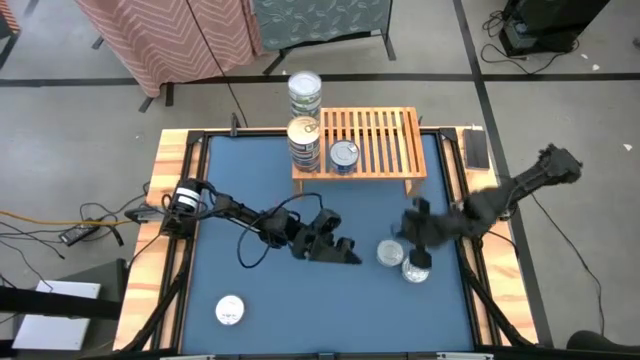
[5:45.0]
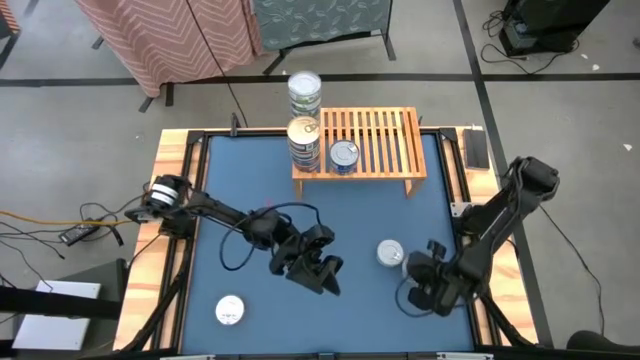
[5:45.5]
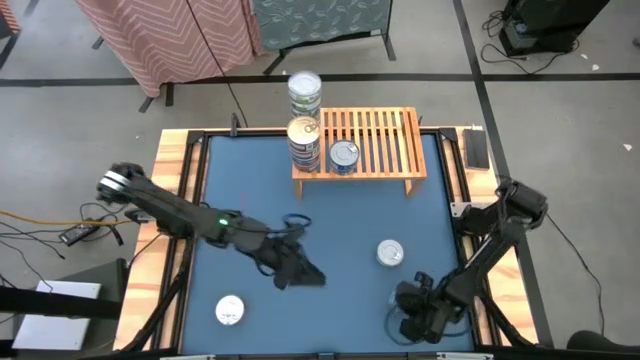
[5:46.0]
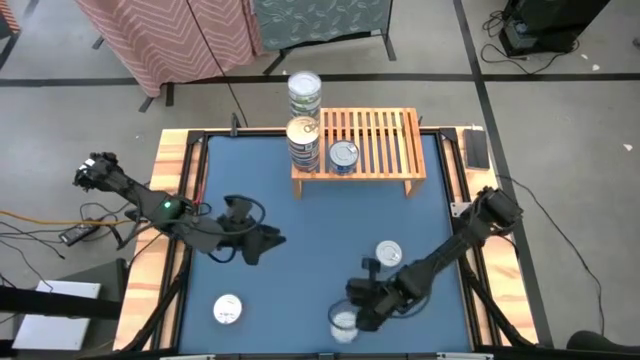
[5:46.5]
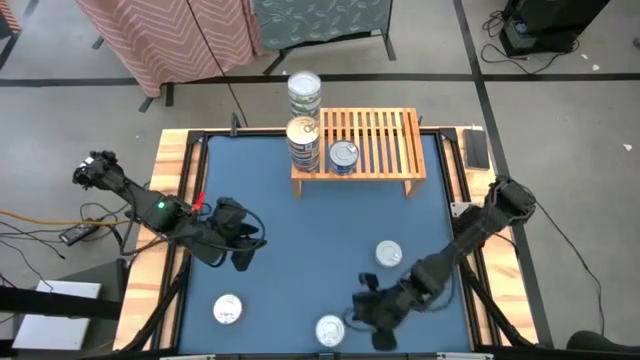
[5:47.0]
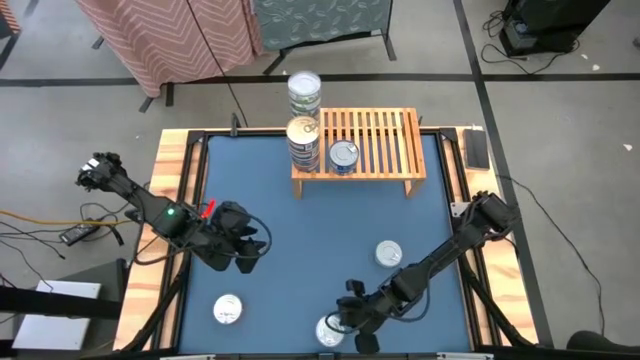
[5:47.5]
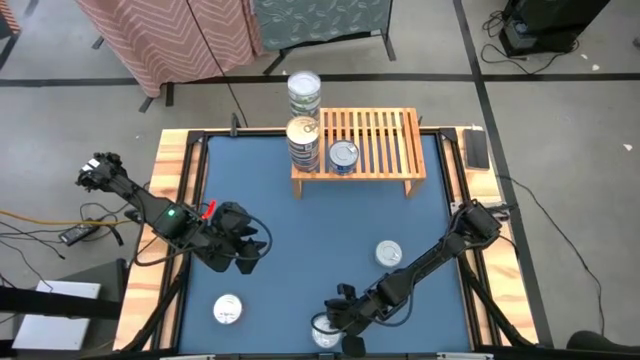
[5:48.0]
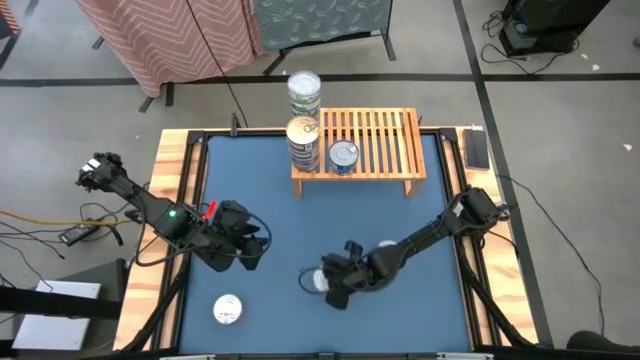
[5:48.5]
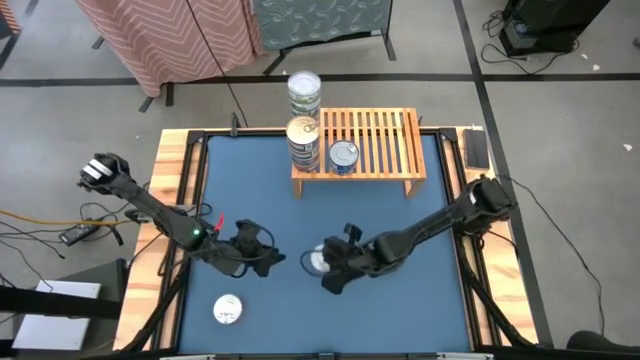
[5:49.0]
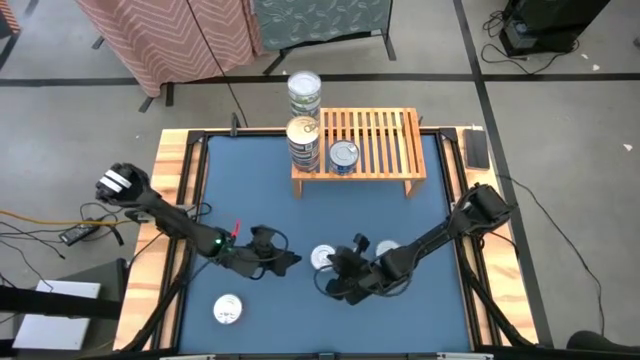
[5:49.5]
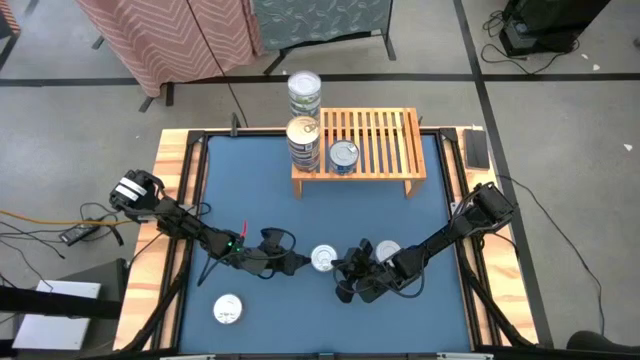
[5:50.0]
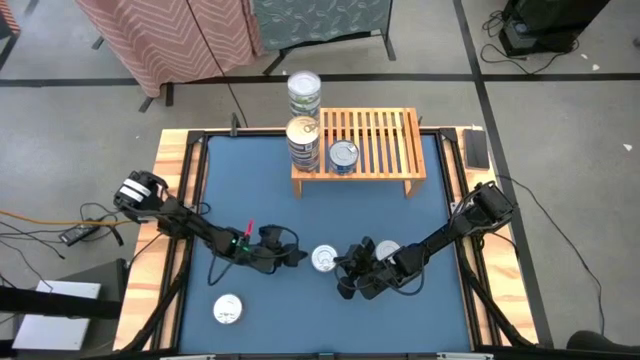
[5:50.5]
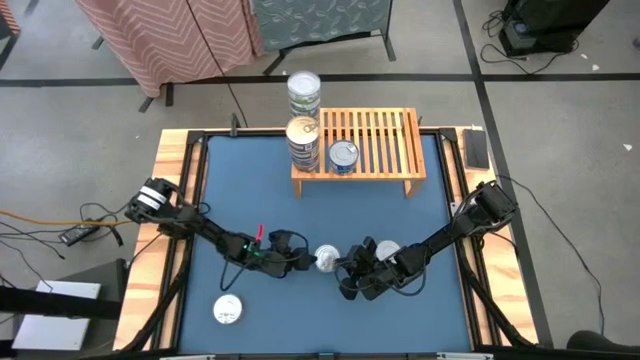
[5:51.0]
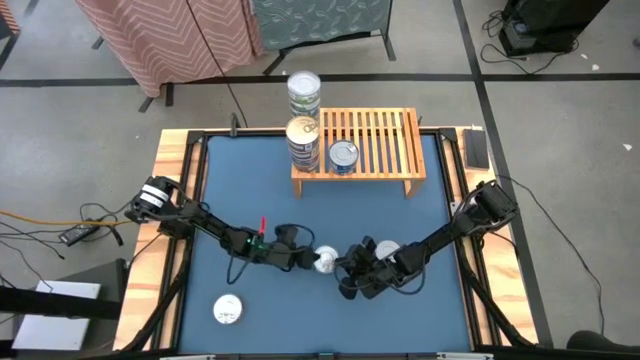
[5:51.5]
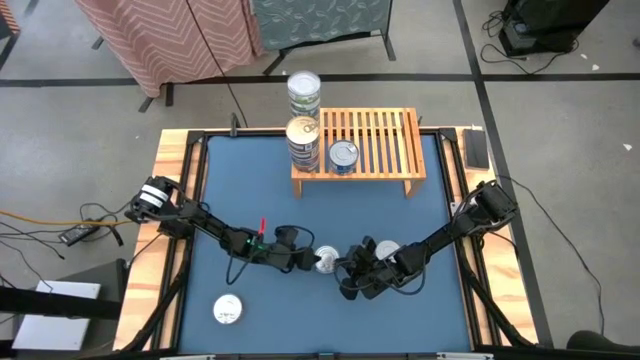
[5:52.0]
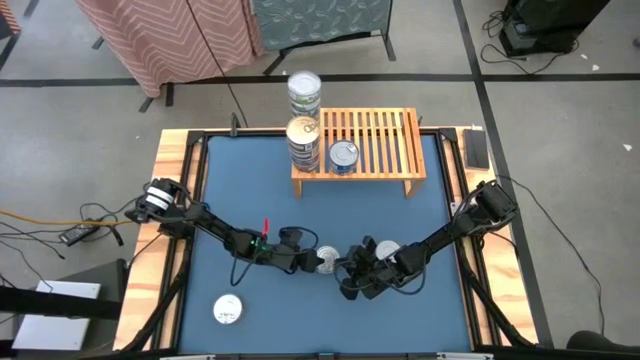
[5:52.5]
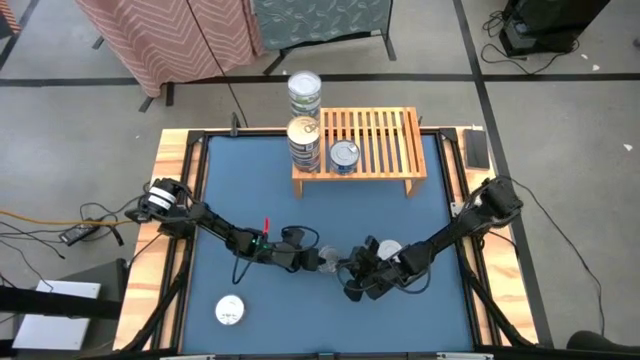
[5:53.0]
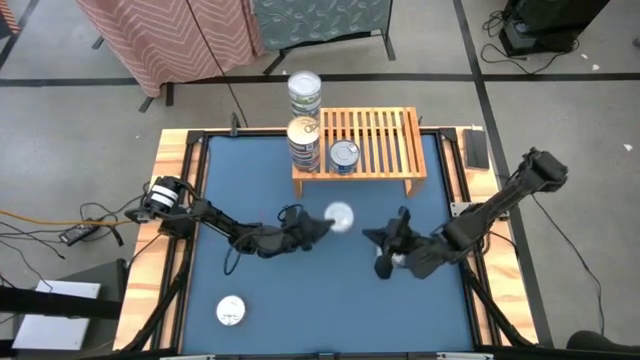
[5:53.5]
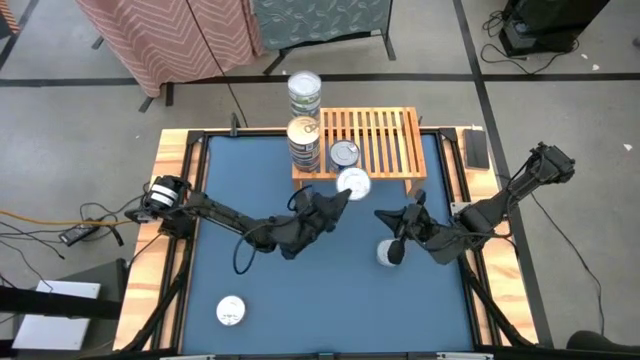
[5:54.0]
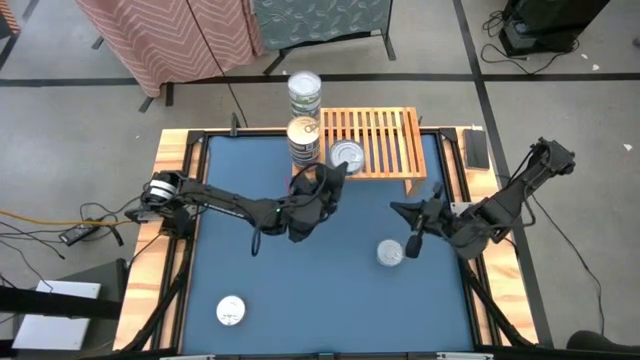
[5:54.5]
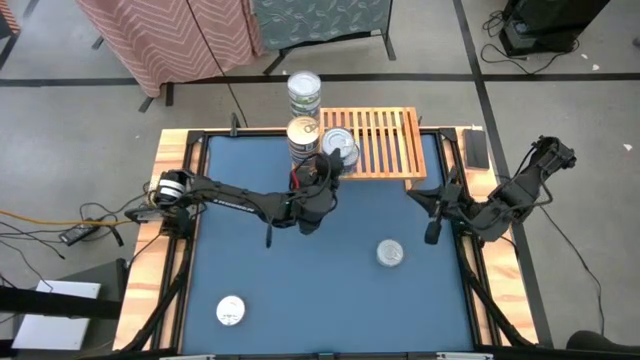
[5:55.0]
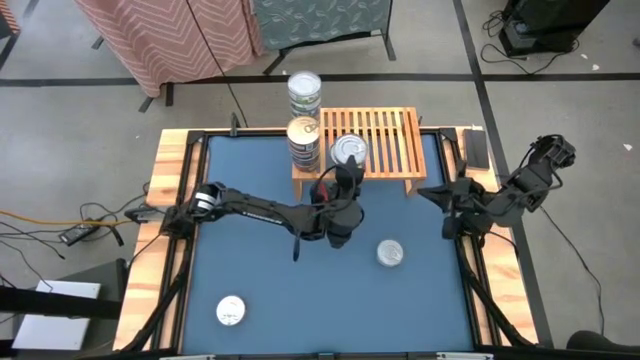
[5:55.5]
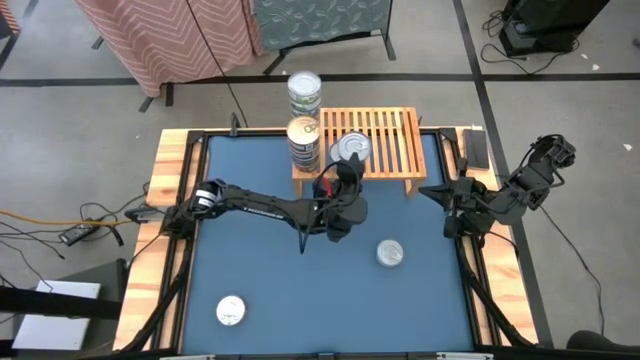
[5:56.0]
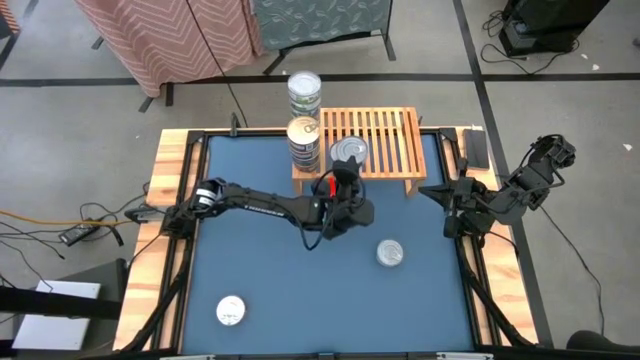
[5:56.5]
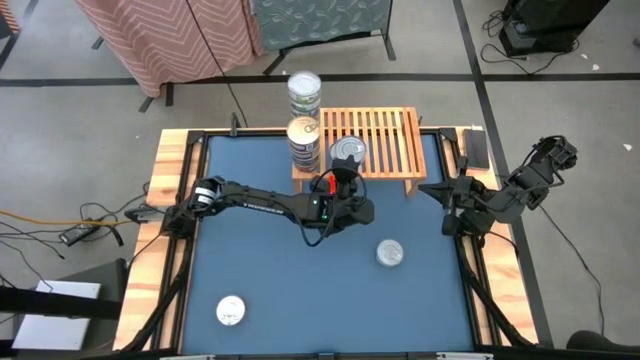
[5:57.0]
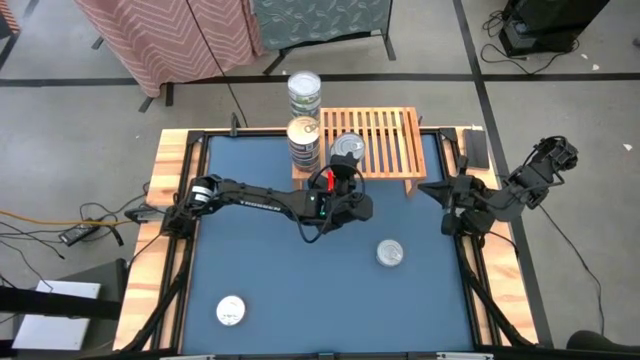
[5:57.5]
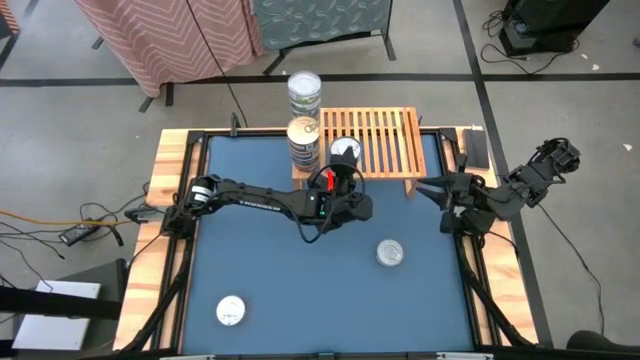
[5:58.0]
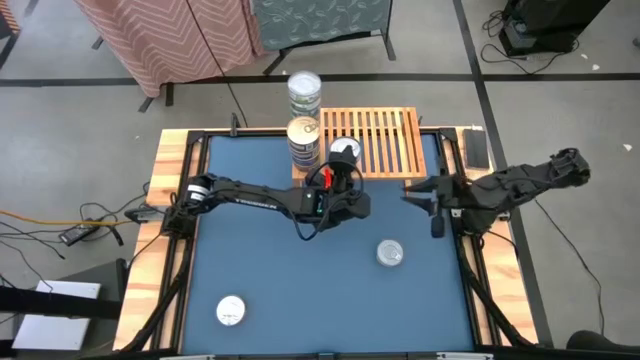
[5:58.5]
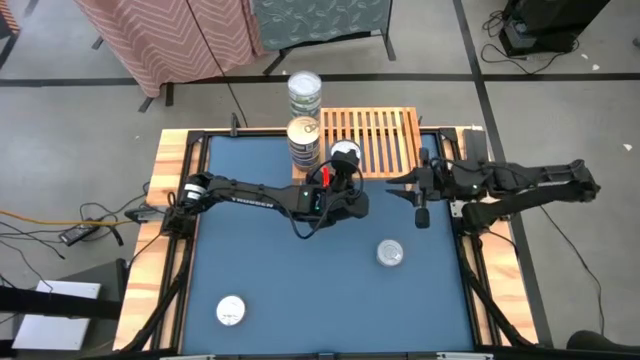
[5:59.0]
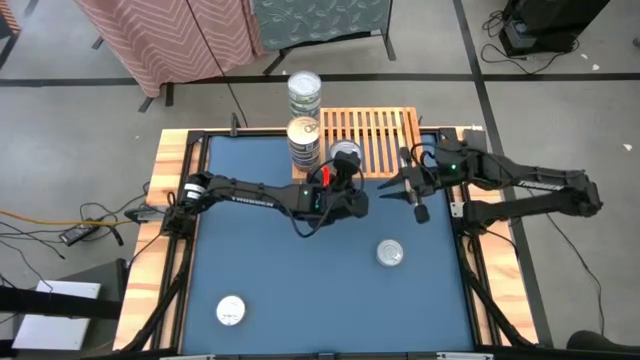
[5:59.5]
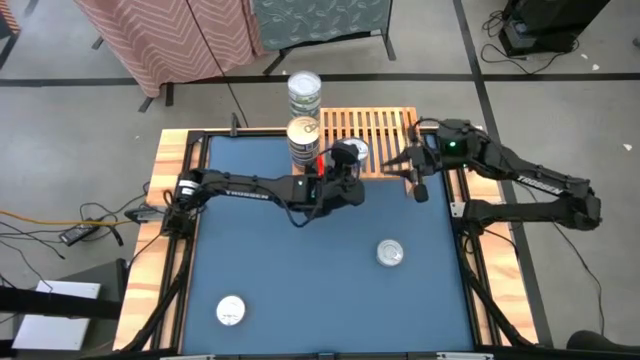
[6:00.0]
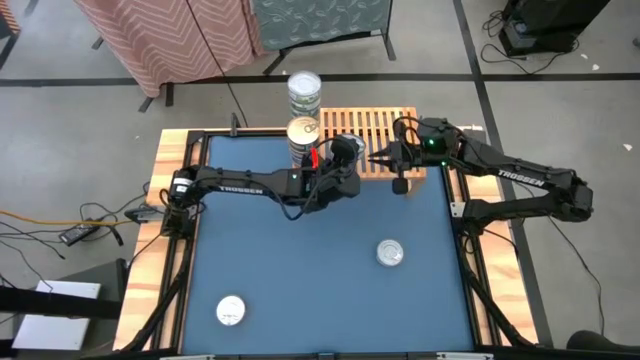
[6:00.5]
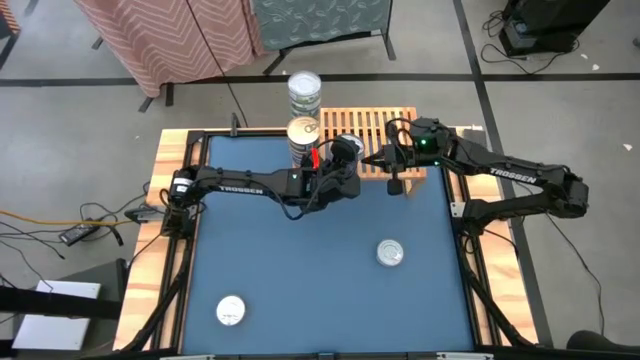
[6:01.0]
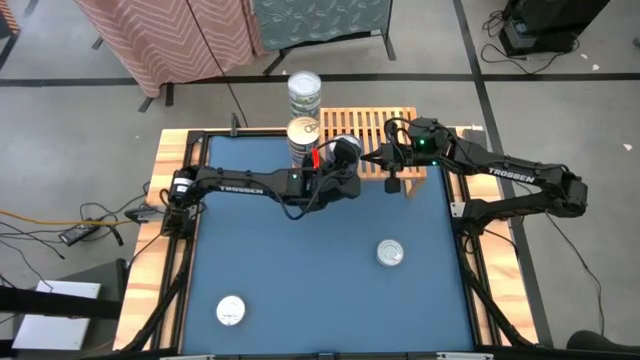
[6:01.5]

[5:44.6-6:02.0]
Task: Stack canned seafood by type on shelf
Stack the dark blue tuna can on top of the dark blue tuna can on the shelf

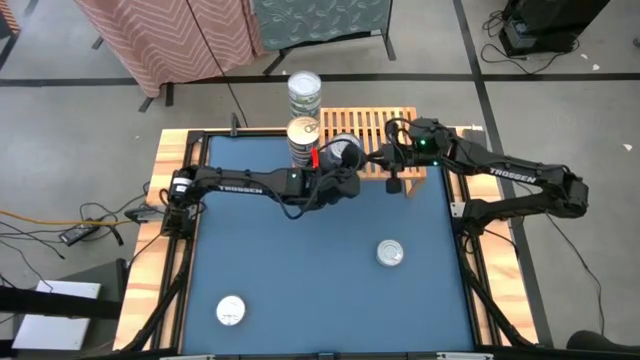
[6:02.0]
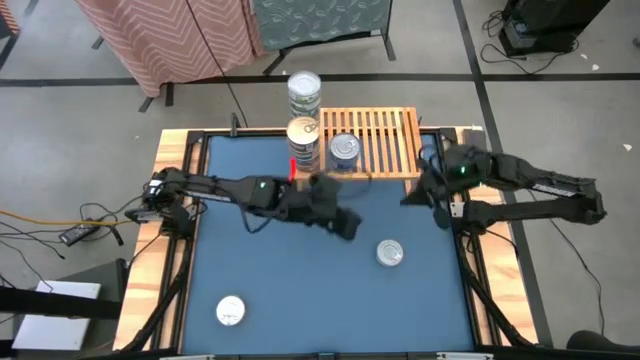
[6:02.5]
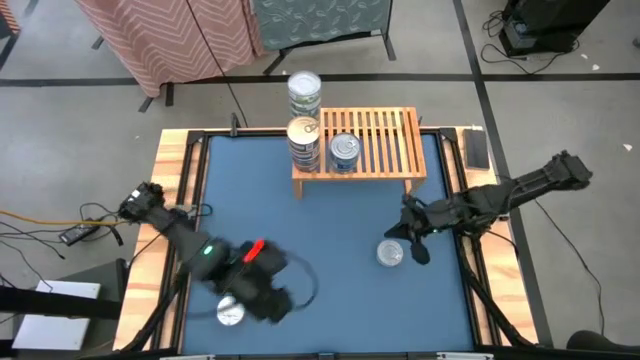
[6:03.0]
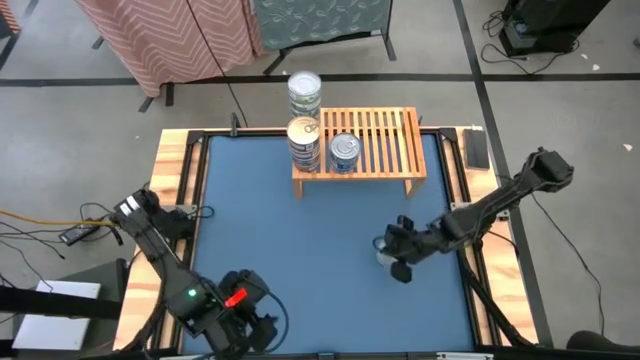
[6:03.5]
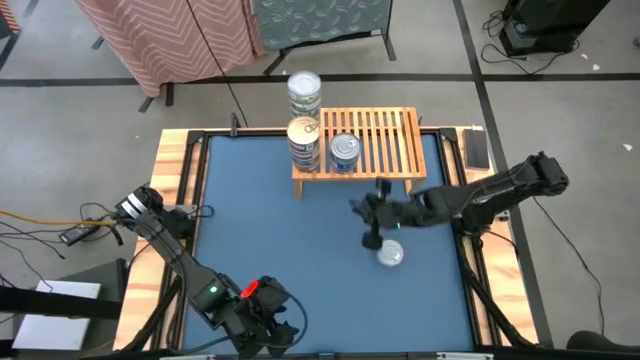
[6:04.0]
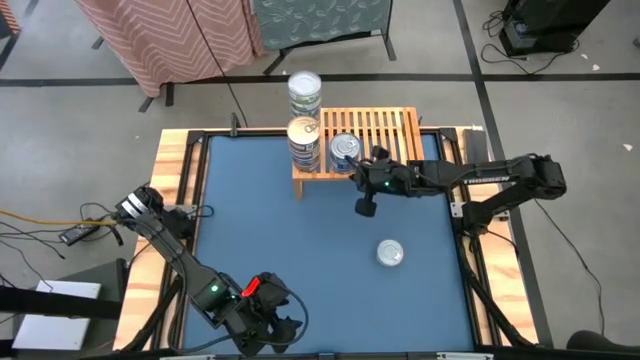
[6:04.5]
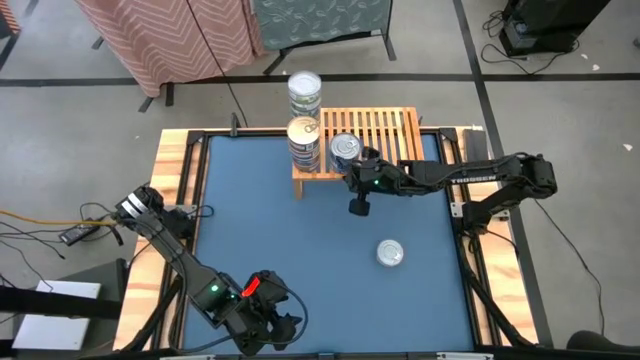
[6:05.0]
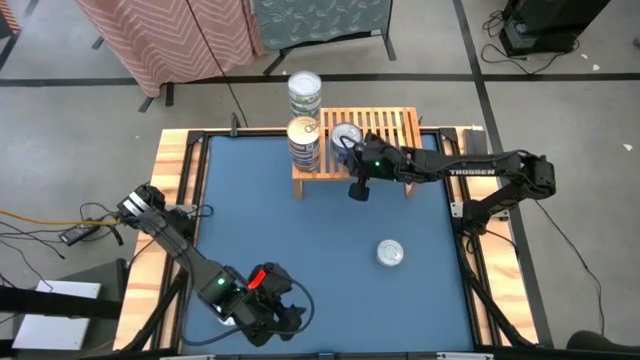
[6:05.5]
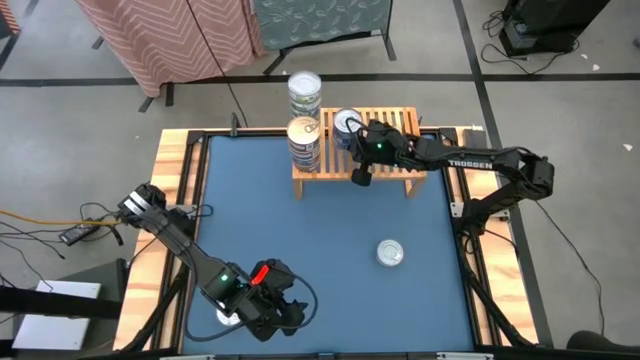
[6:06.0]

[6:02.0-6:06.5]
Adjust the stacked dark blue tuna cans on the shelf

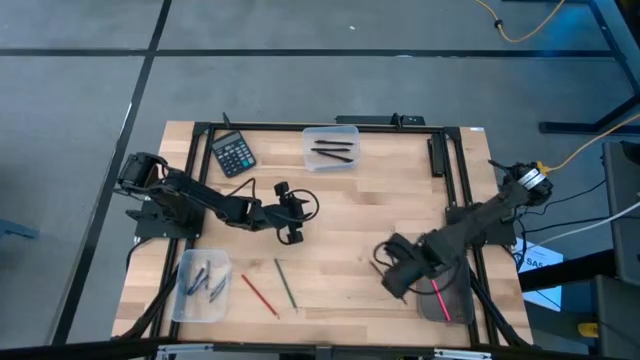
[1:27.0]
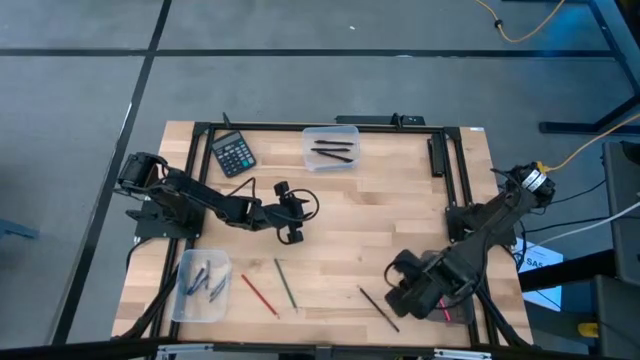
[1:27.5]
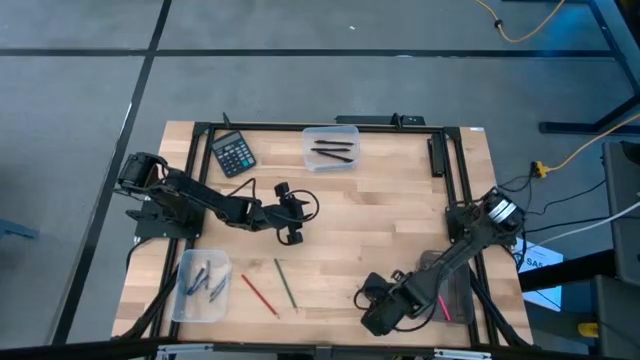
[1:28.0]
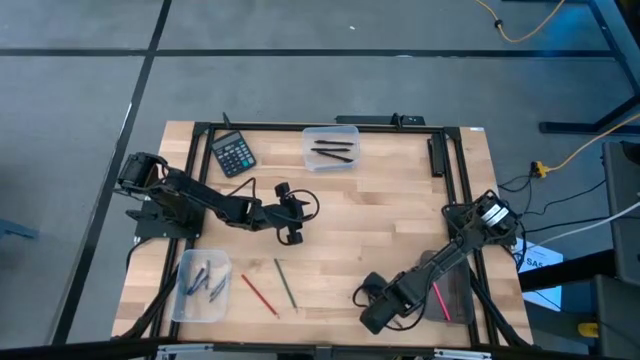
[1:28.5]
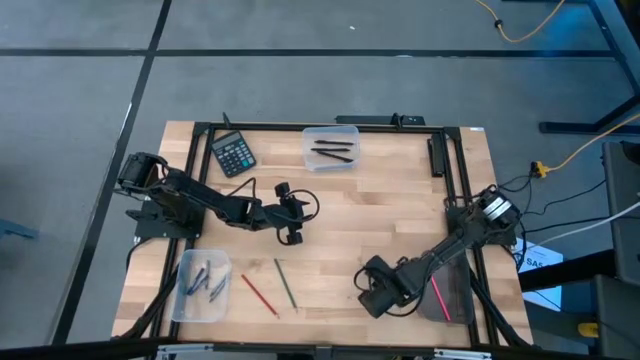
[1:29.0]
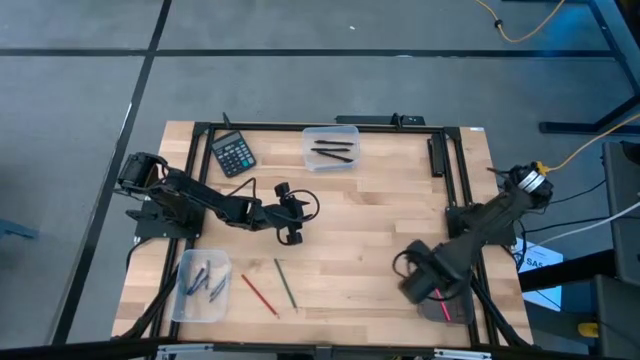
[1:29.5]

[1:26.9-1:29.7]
Task: Sort crayons/erasers/pens/pencils in bins
Put the blue color pencil into the black bin
